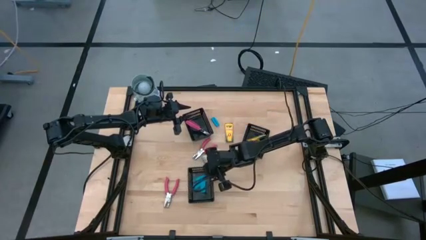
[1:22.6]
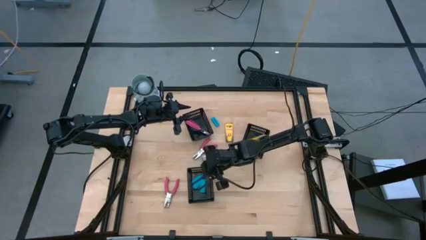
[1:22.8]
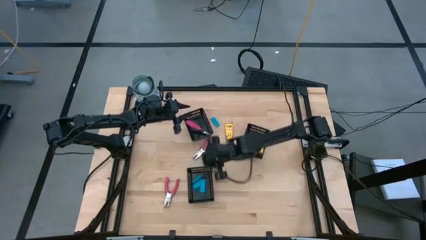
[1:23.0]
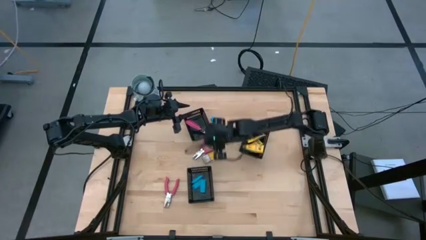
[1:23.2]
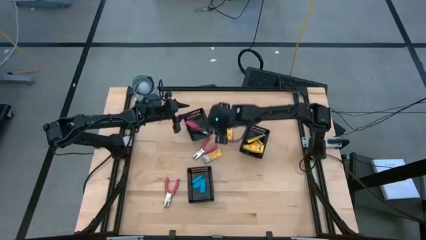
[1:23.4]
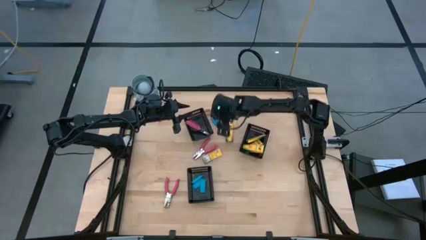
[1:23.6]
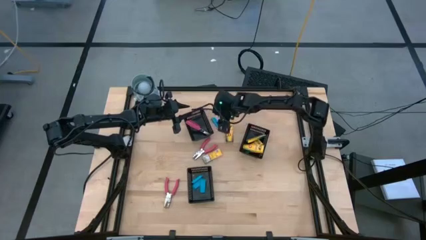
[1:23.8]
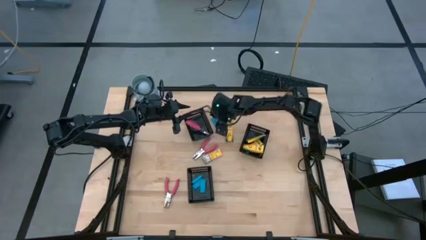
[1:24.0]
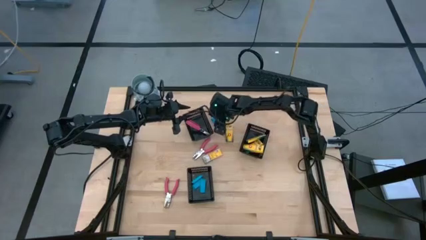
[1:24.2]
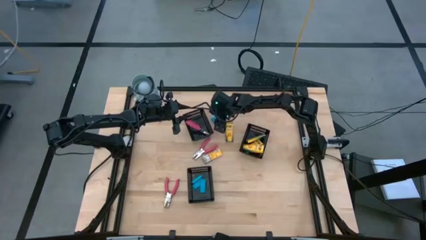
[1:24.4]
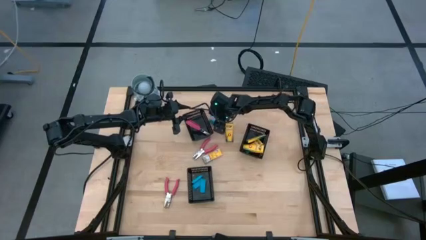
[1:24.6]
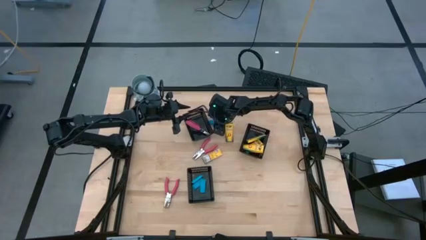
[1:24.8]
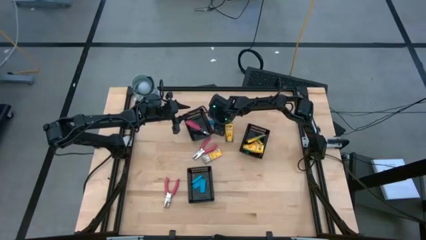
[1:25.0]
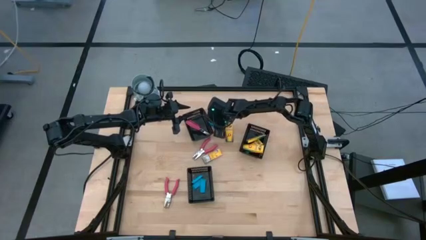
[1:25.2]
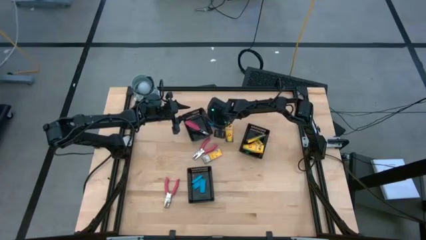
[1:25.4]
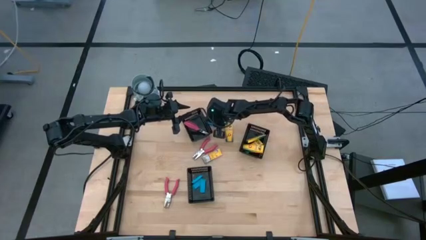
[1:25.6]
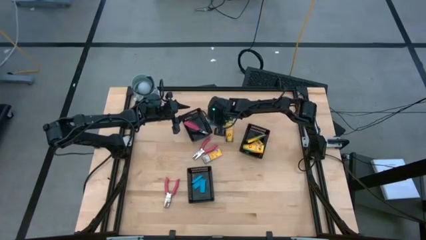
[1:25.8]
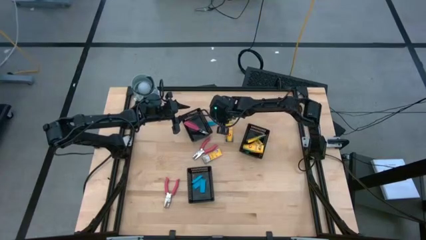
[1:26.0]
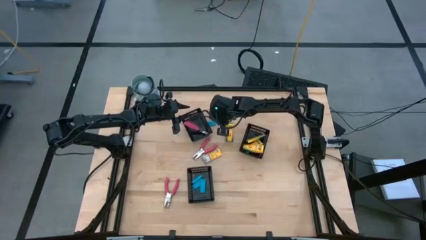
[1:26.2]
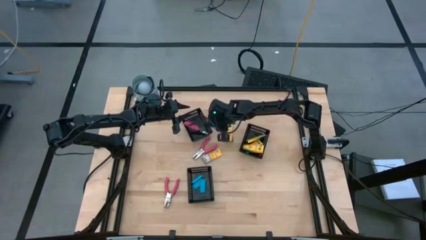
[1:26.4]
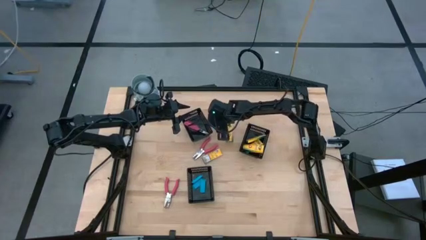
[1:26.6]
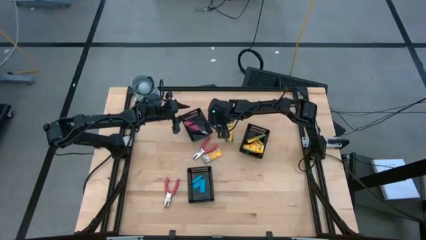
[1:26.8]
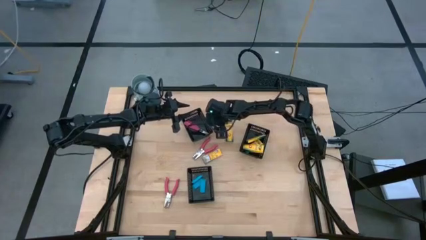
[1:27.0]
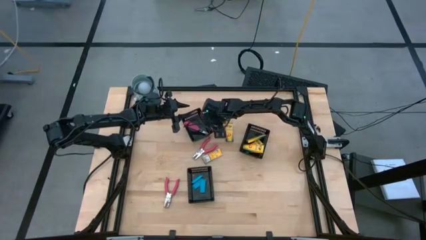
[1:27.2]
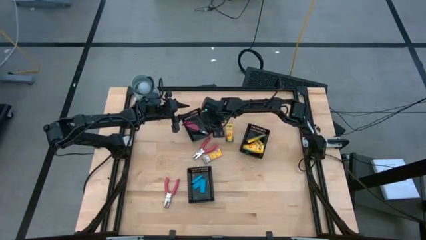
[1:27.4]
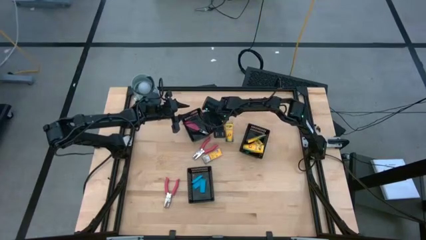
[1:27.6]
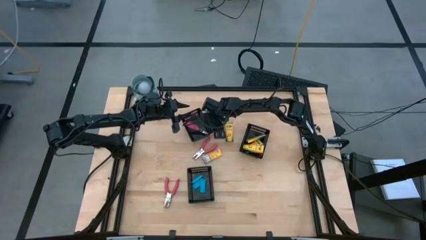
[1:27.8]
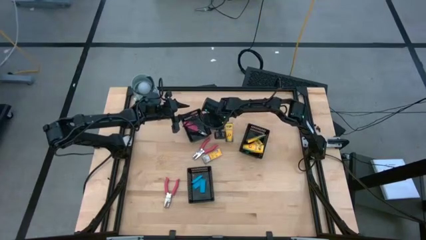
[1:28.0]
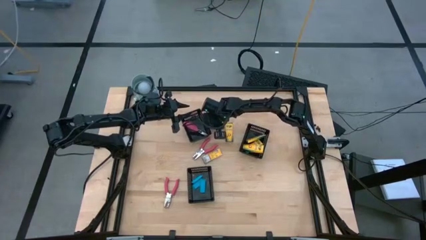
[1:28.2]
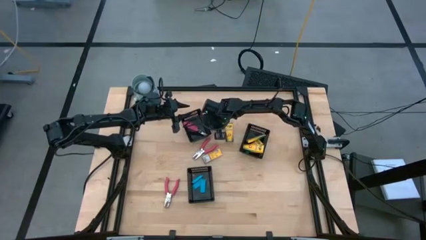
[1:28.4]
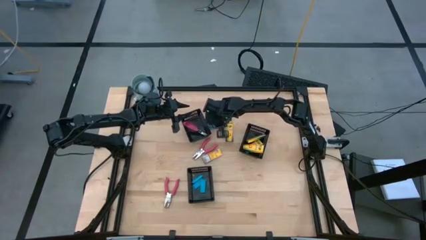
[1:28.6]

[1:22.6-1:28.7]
Task: Pick & Place School Supplies
Put the blue eraser into the bottom left black basket

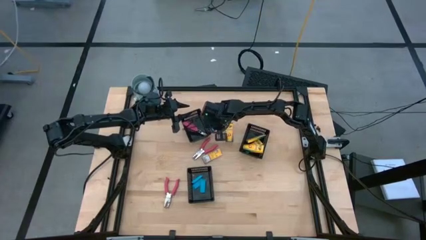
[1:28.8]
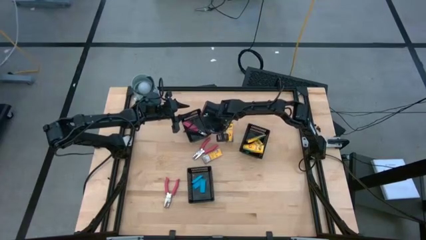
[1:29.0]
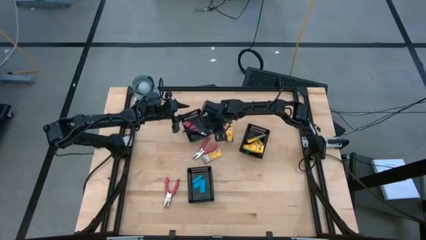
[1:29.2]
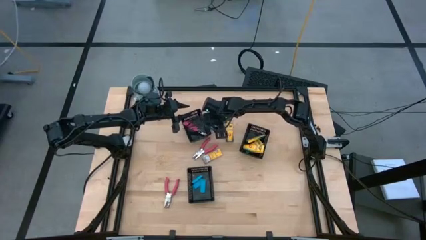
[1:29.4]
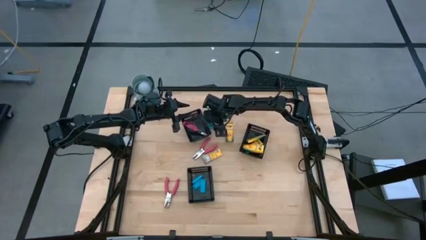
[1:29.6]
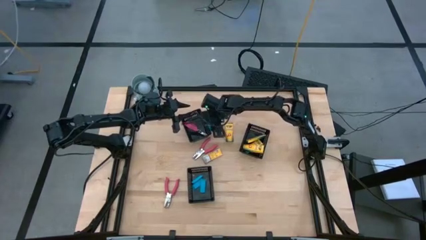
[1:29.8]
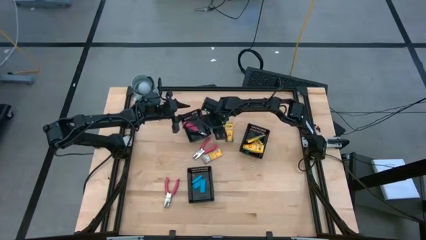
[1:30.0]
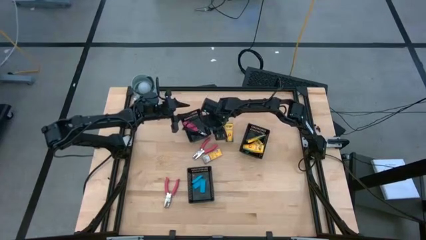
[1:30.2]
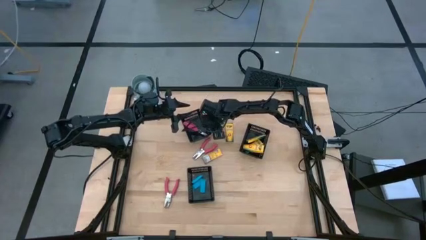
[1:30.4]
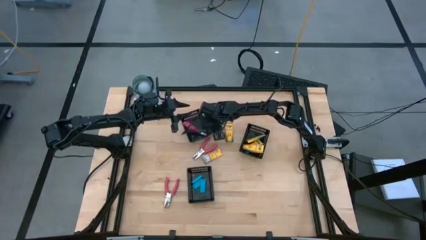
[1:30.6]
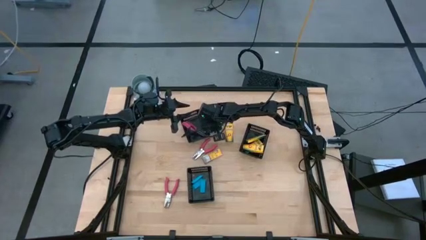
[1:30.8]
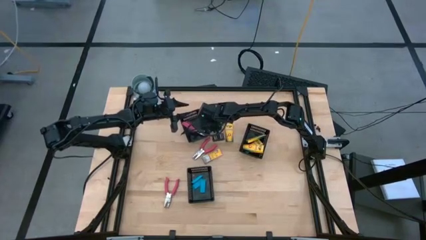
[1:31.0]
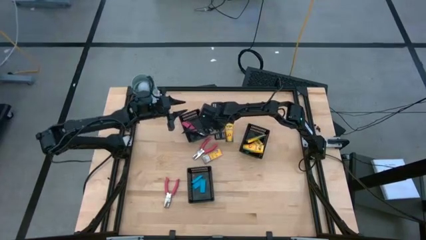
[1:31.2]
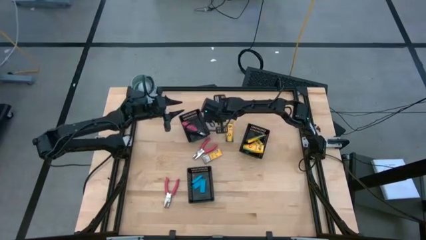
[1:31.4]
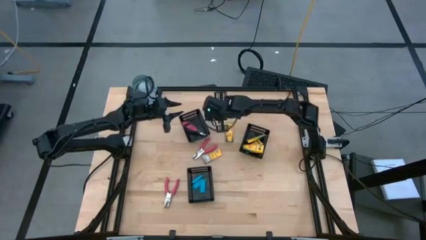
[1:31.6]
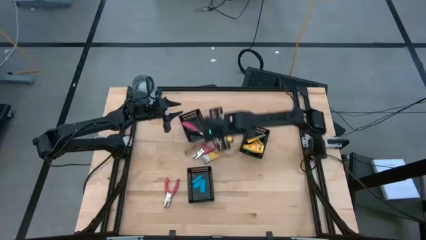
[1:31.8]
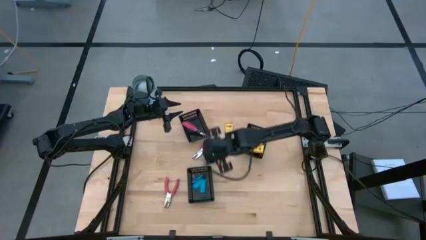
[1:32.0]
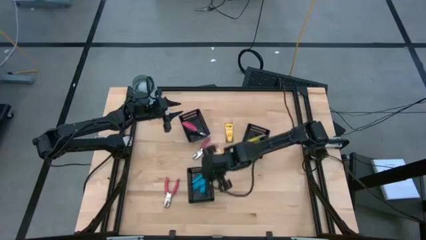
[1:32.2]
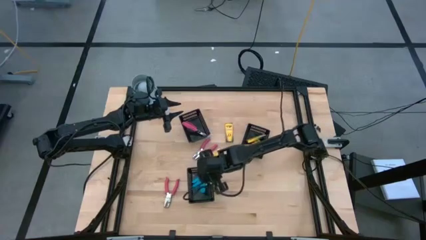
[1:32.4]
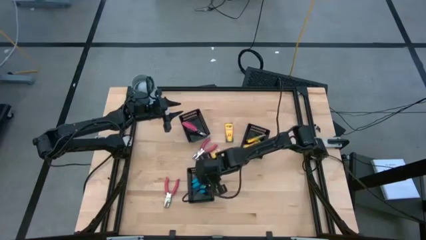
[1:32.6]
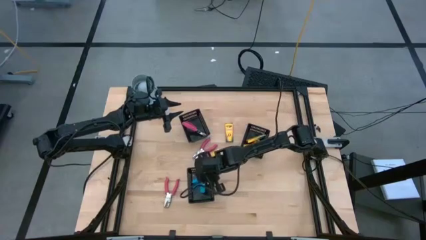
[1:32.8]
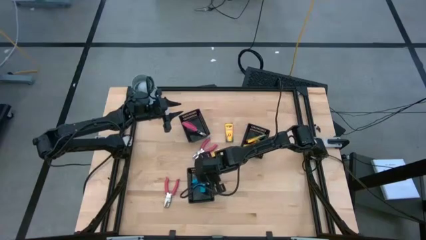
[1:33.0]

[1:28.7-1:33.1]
Put the blue eraser into the bottom left black basket

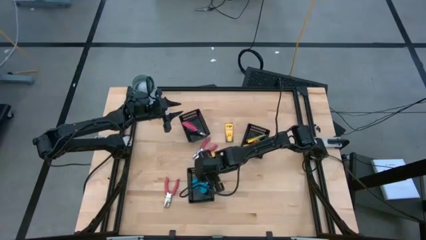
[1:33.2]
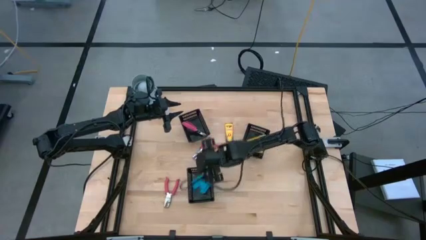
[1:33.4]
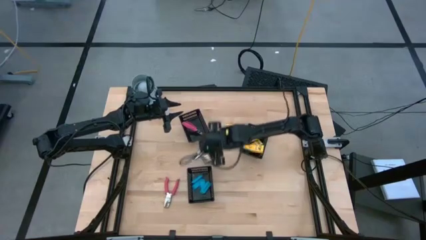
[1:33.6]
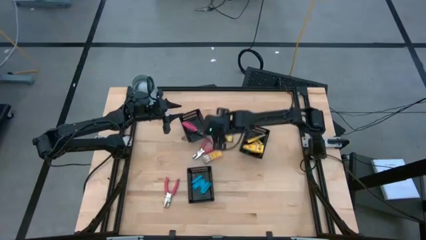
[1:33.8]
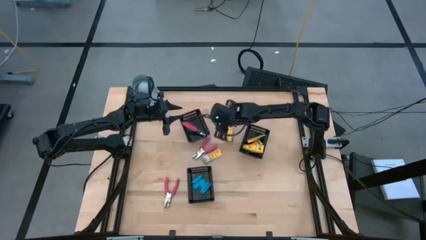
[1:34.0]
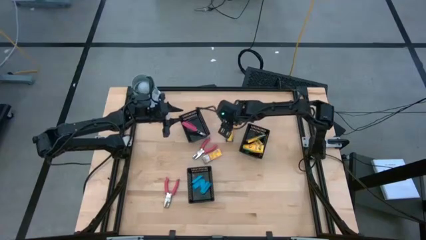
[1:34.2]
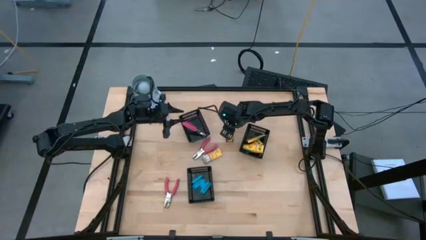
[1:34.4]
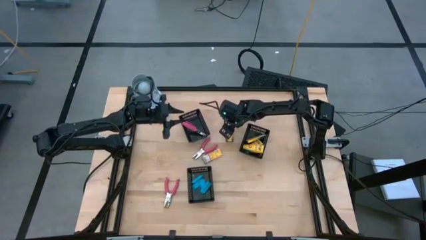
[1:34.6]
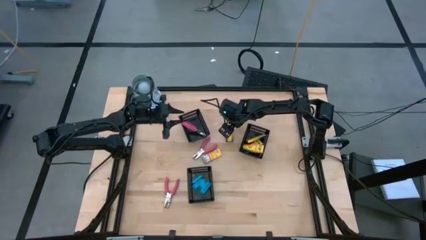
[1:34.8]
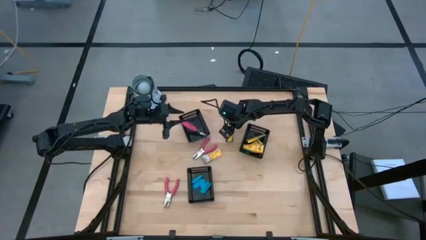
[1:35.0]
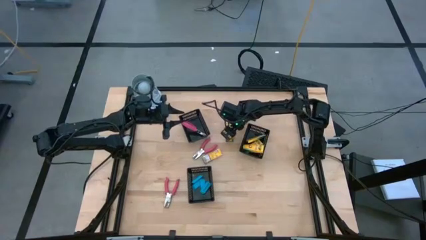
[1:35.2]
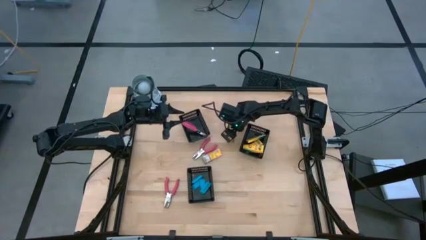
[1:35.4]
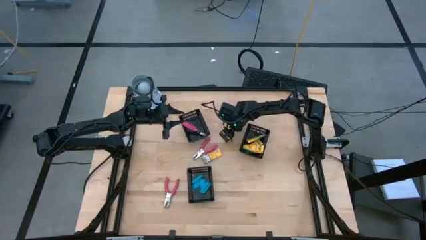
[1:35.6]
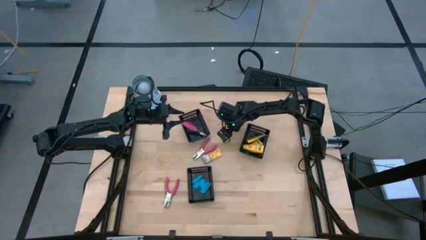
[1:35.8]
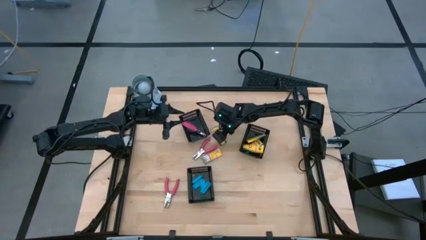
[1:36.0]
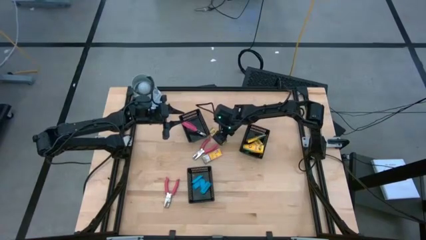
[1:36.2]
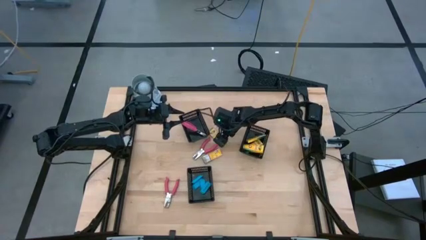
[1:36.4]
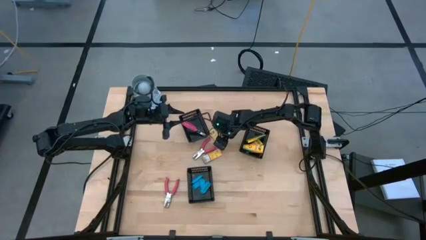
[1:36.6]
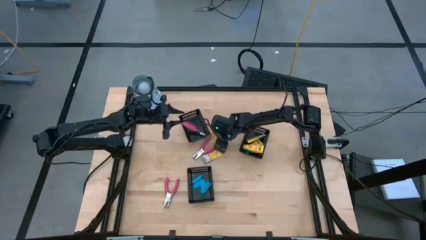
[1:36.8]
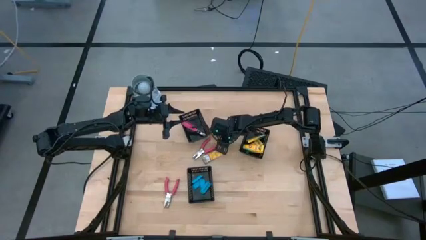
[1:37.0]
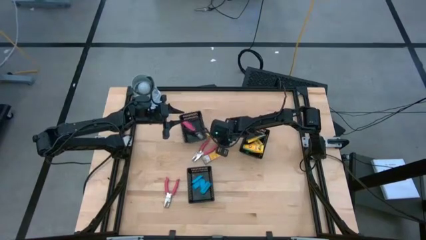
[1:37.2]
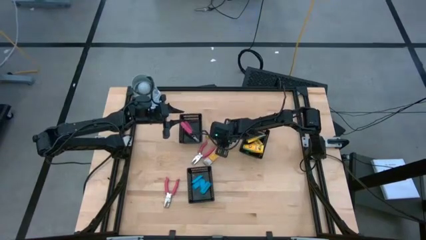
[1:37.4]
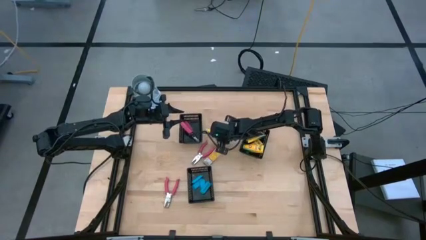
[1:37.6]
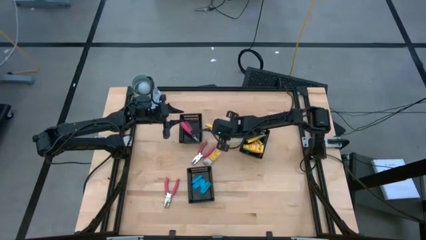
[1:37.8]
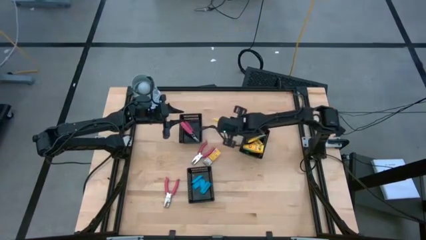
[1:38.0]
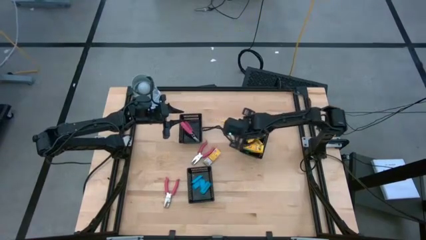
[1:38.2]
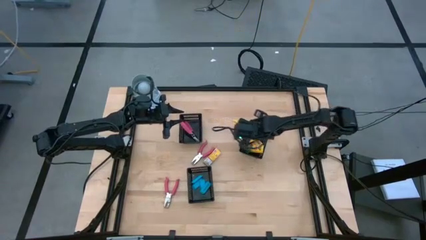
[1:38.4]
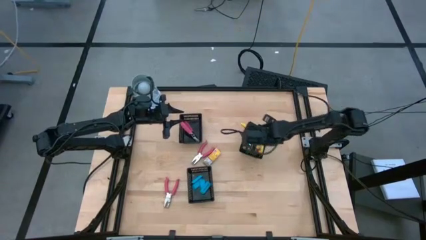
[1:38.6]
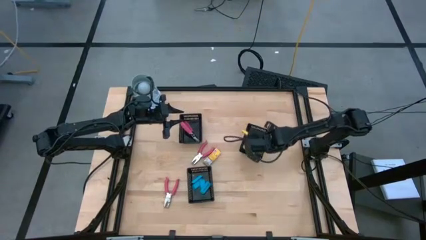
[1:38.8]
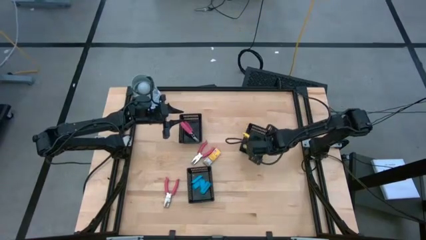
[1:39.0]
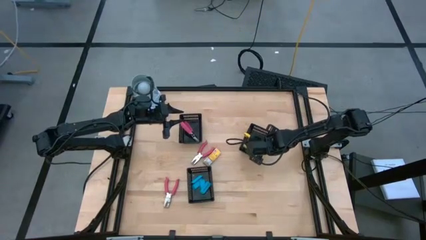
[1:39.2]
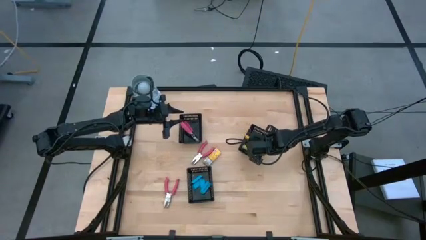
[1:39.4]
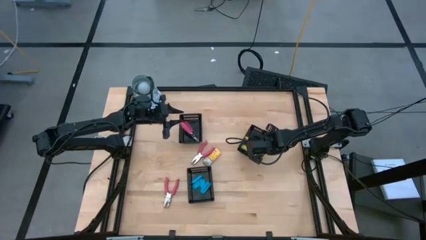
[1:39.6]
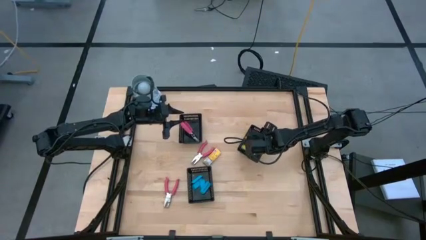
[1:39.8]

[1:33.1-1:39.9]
Put the yellow crayon box into the right black basket
